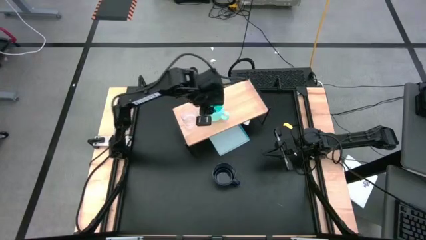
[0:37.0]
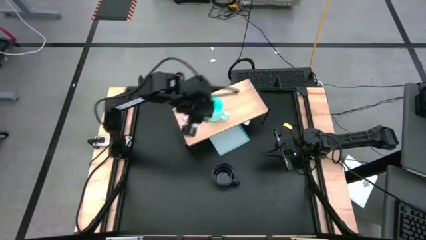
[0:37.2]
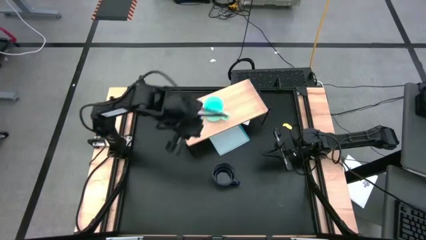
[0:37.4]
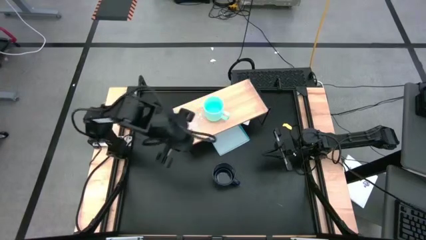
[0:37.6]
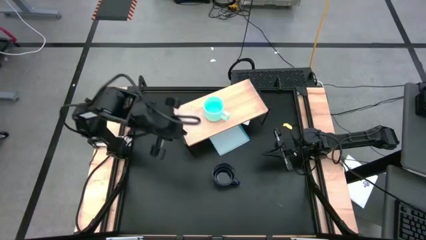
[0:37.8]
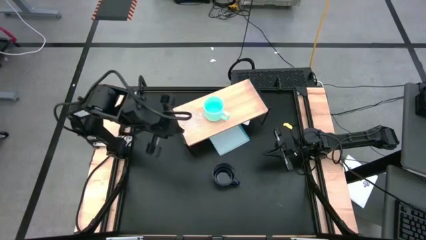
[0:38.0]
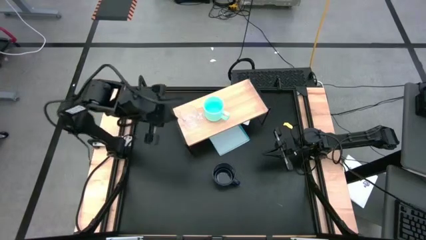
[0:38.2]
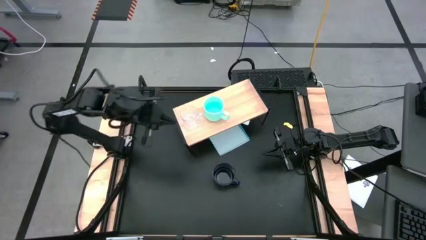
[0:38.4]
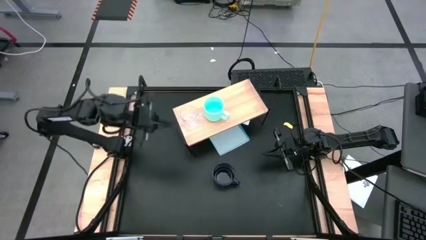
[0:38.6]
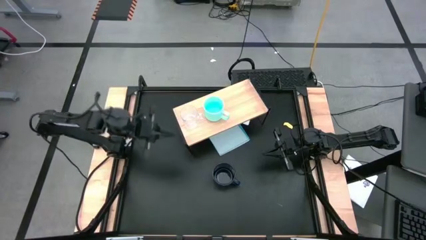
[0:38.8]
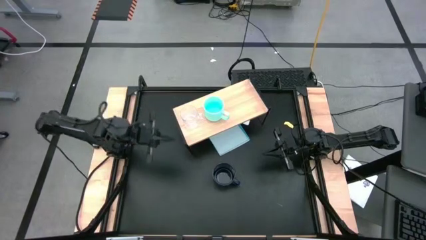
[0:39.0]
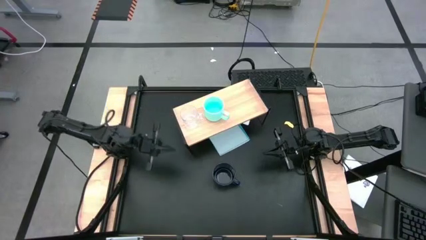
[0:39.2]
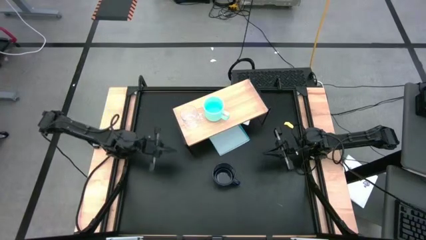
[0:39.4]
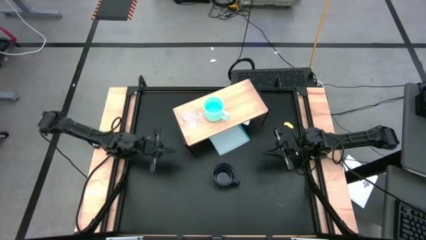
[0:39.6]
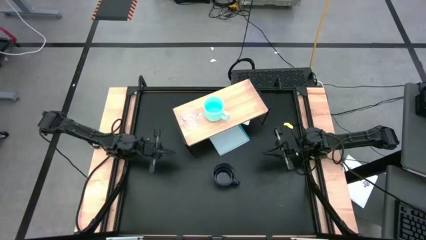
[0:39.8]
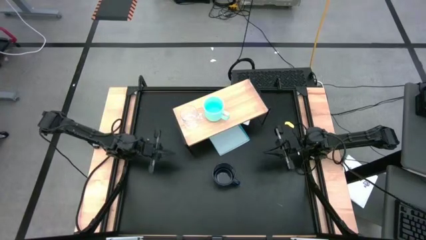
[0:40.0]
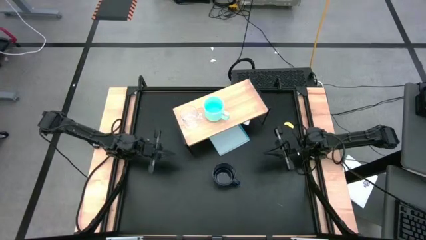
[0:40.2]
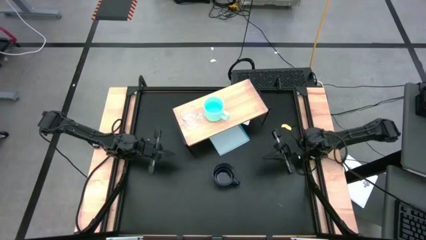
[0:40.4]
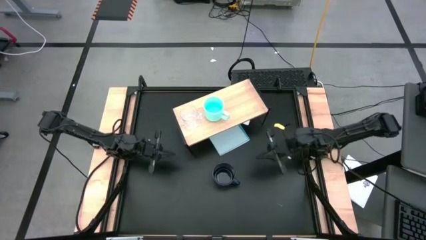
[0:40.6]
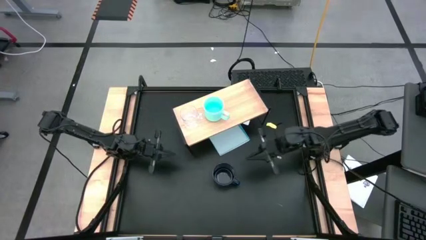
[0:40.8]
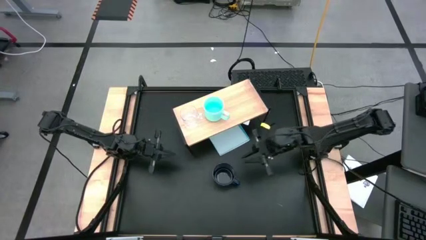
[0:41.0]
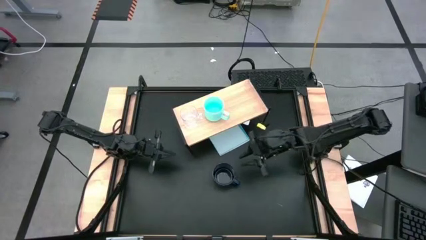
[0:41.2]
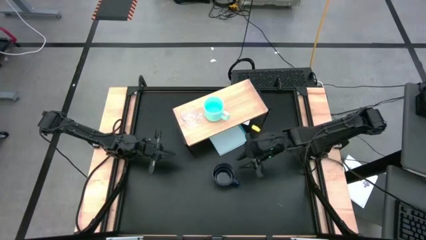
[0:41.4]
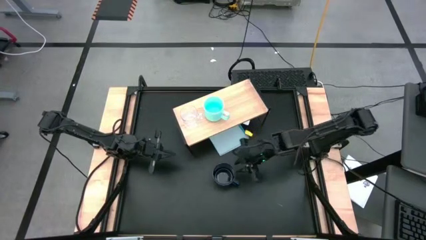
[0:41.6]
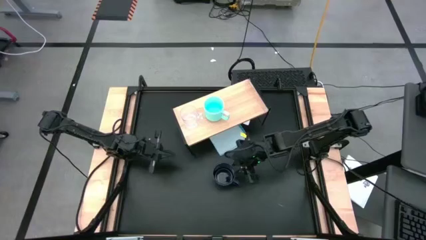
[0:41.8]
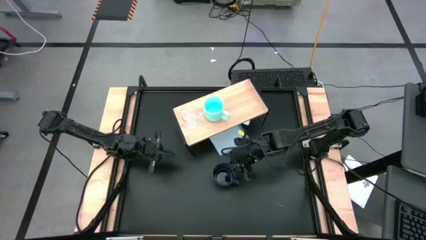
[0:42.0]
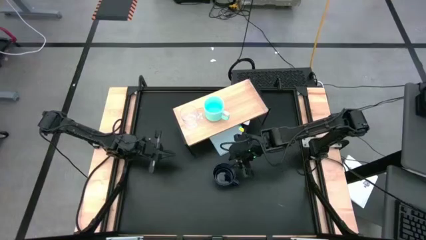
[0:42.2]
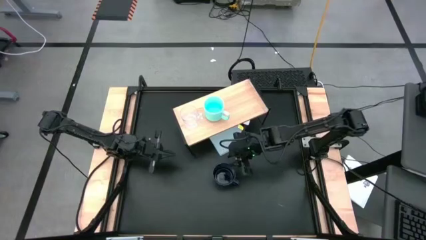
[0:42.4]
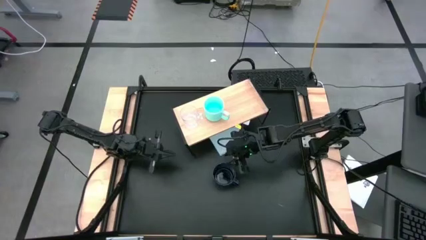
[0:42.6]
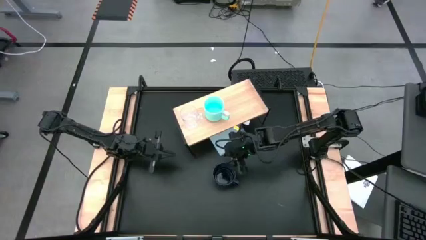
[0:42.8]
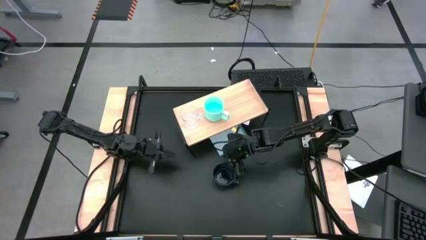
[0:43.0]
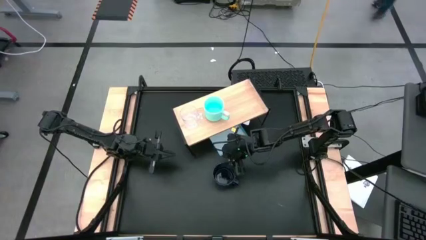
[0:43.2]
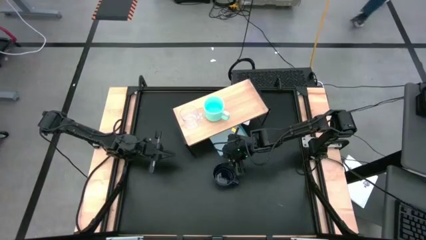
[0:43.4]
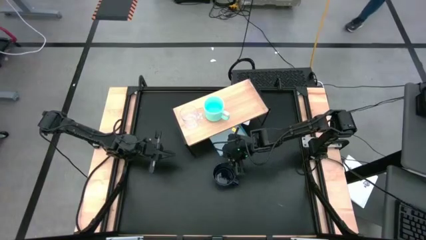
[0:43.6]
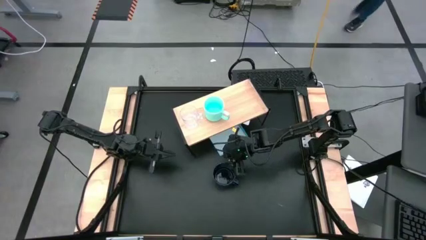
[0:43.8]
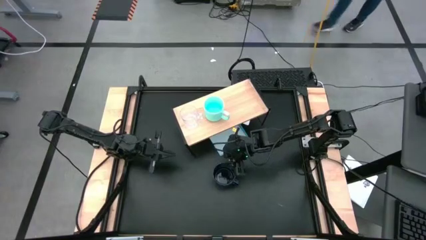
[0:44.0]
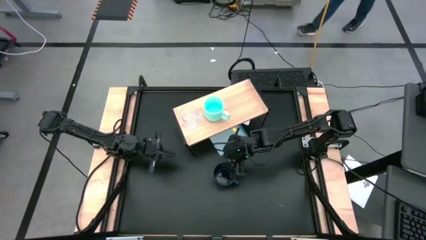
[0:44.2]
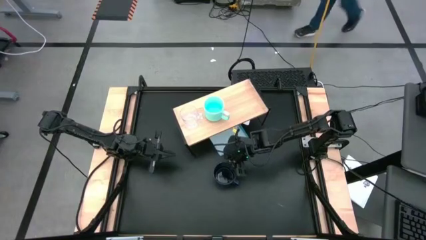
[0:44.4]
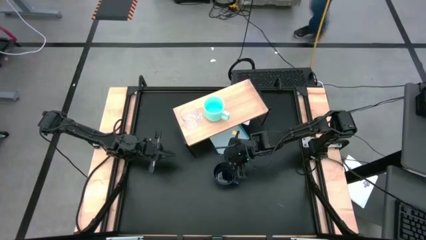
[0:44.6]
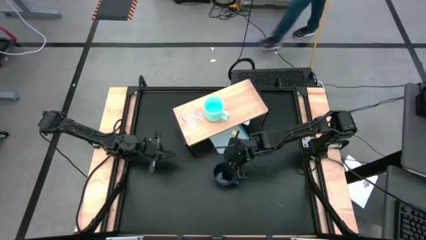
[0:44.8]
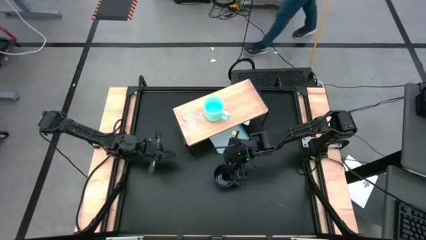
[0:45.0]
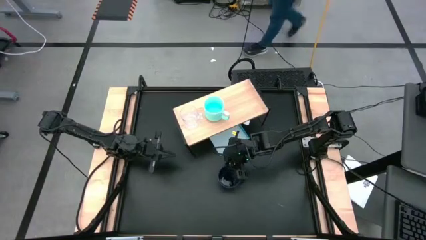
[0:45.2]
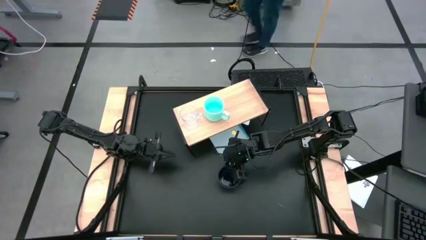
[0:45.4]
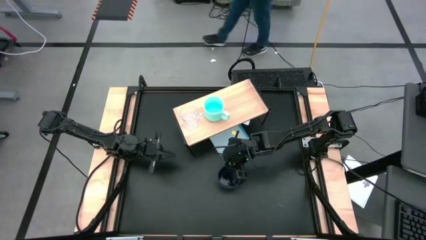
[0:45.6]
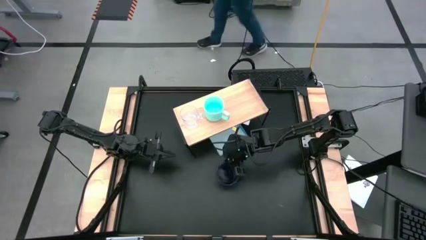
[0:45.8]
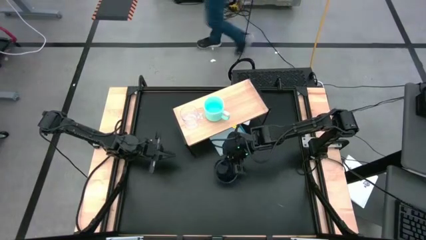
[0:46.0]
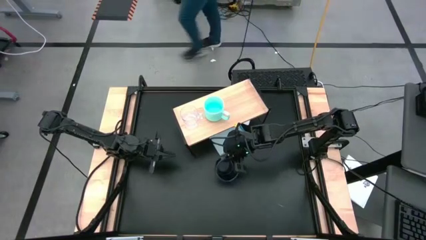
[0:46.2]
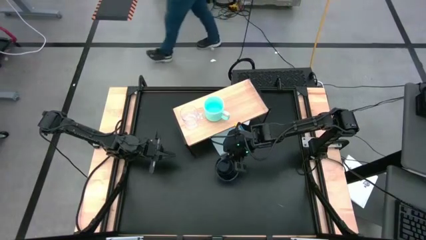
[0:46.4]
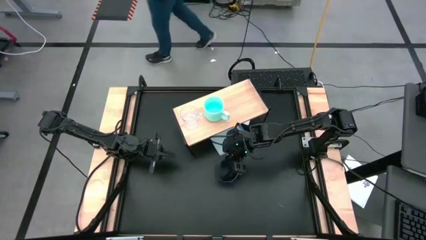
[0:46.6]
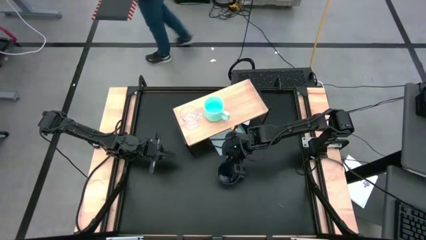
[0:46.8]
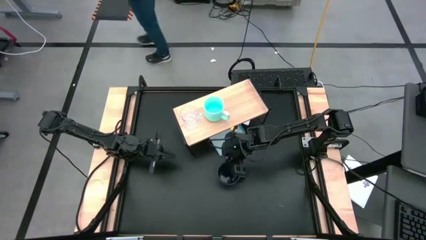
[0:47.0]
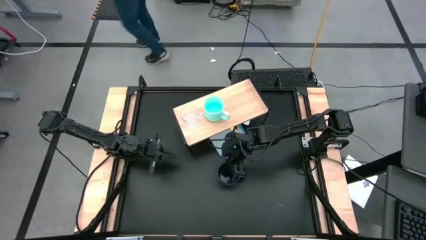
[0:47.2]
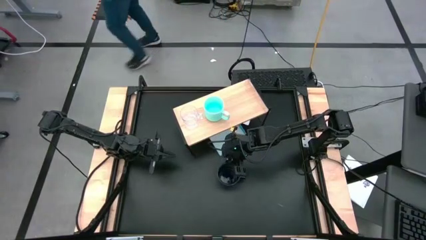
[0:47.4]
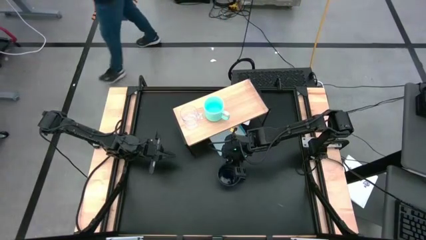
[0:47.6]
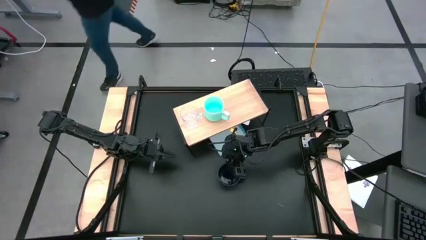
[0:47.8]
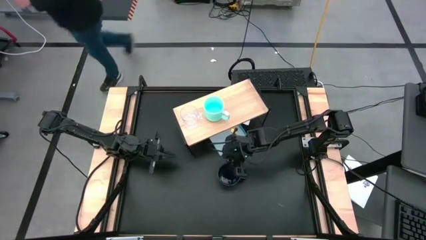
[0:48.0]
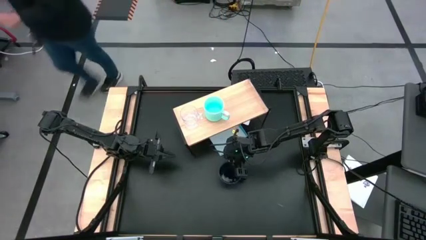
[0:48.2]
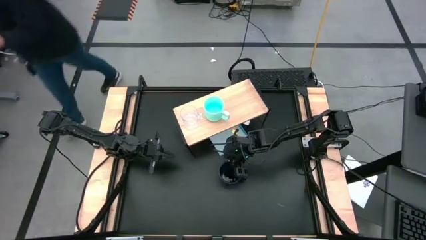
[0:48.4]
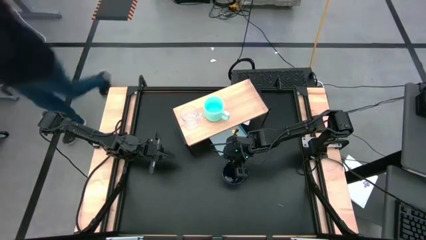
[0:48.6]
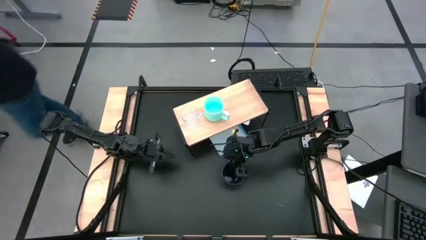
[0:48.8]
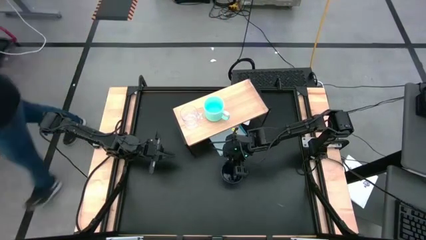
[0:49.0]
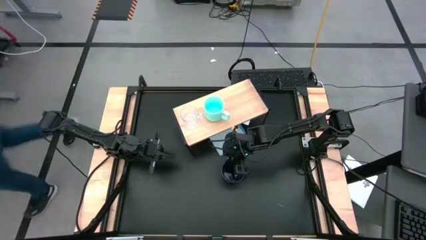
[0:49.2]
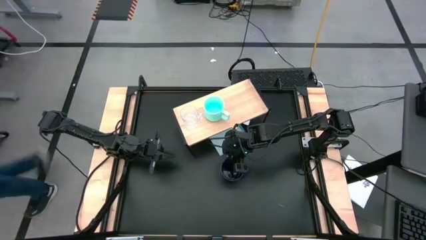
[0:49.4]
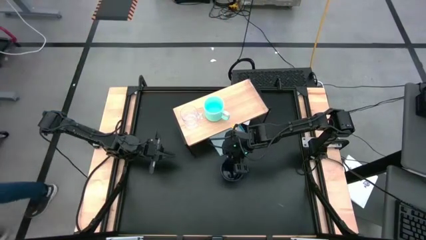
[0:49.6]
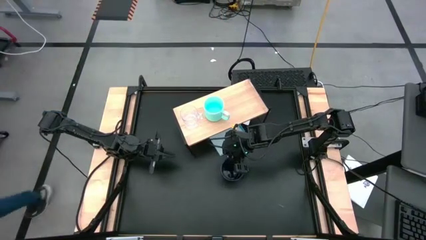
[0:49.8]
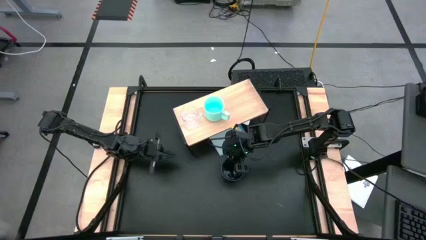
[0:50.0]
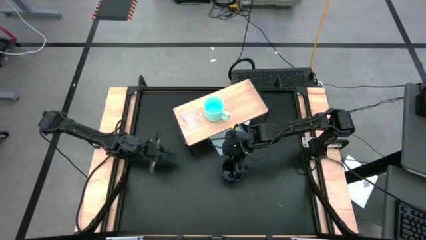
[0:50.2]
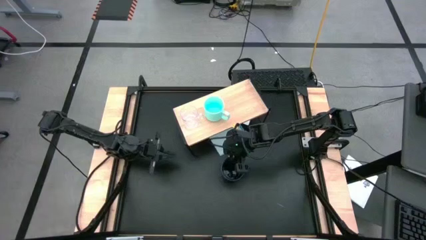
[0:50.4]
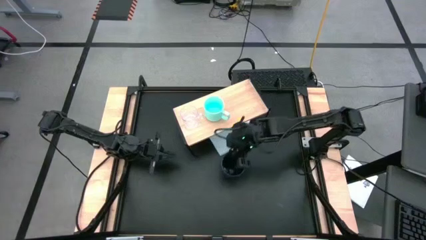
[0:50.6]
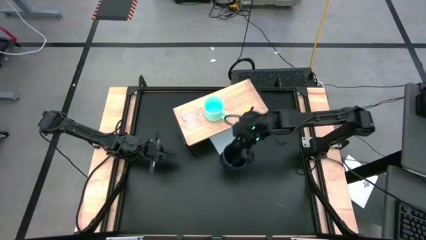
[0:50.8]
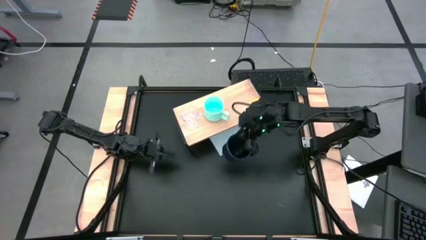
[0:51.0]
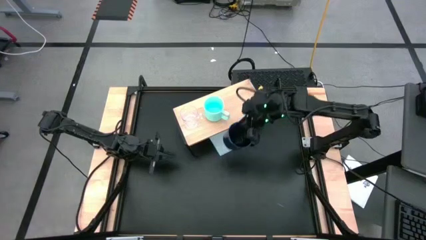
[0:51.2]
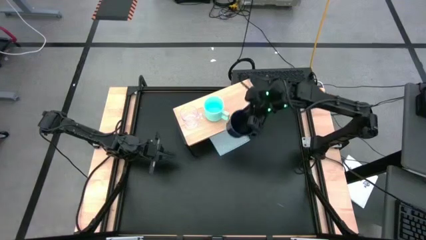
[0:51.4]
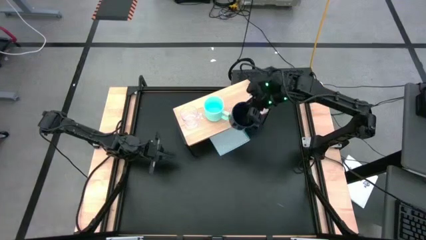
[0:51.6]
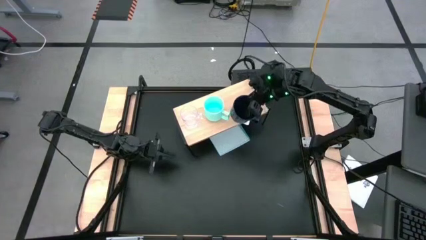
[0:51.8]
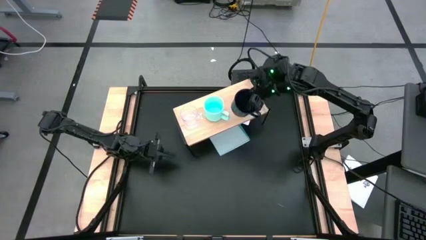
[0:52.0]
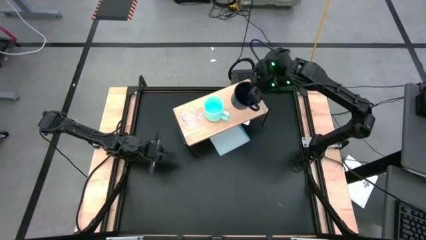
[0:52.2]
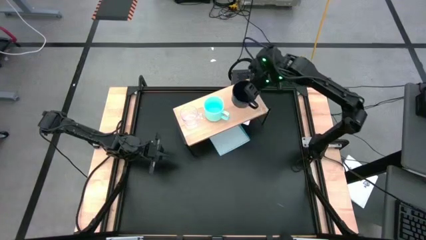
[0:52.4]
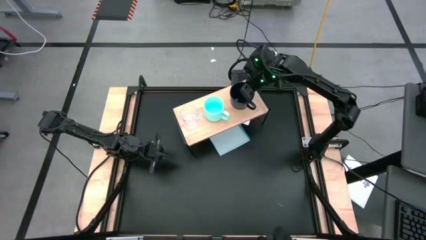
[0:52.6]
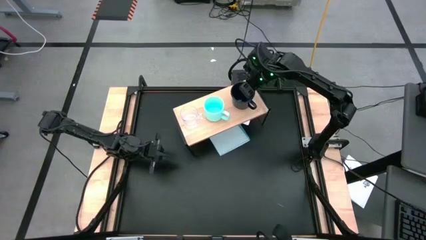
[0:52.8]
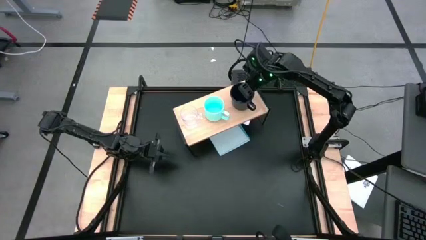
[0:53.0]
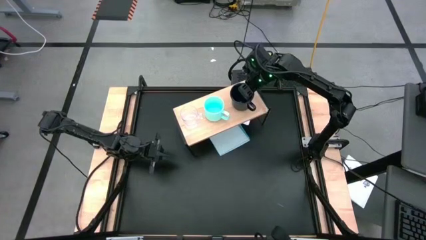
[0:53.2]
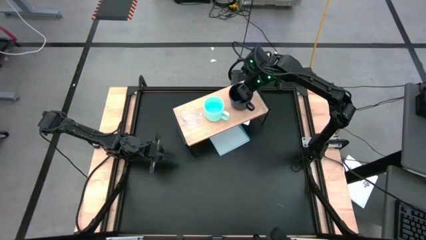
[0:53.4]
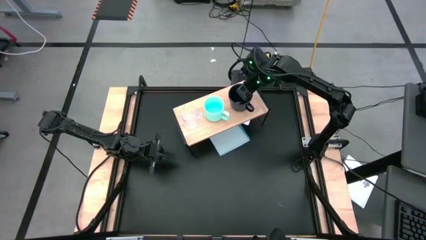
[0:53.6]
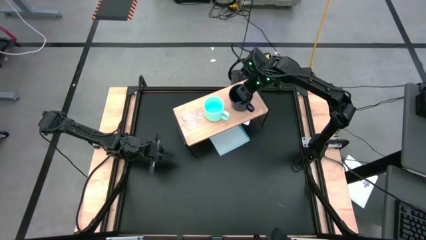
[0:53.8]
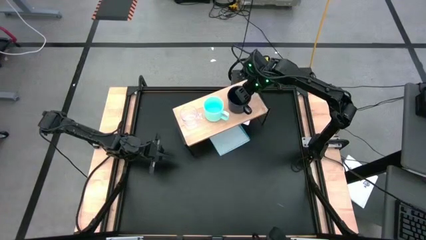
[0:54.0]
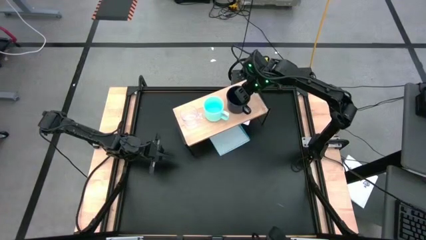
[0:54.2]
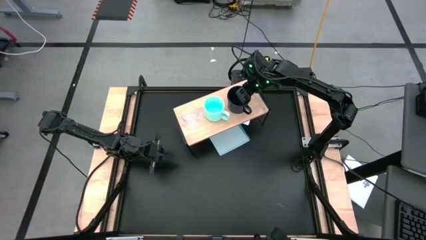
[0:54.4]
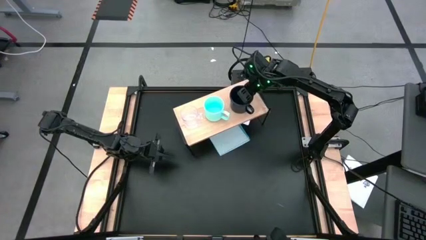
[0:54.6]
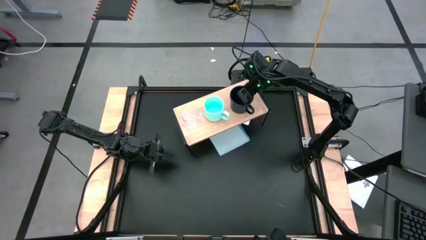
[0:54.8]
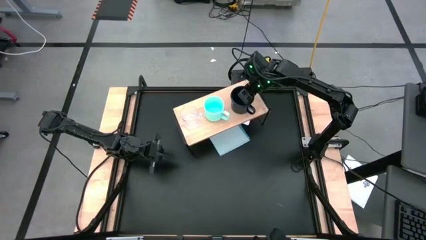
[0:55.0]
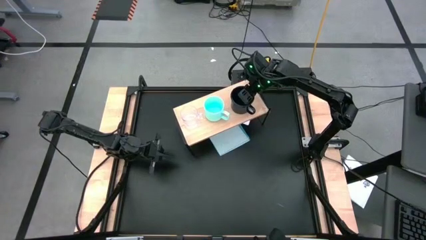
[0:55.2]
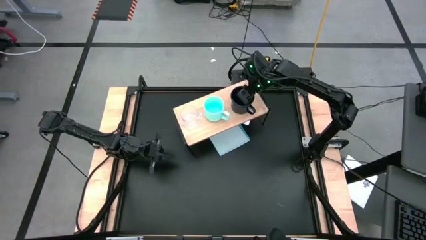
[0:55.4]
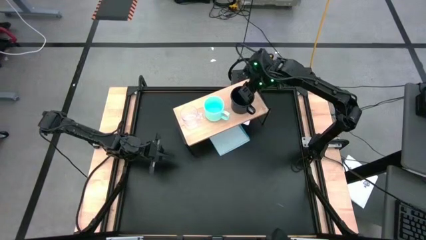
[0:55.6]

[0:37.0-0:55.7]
Task: Stack small to large cups/mugs on shelf
Put the dark blue mug on the shelf
